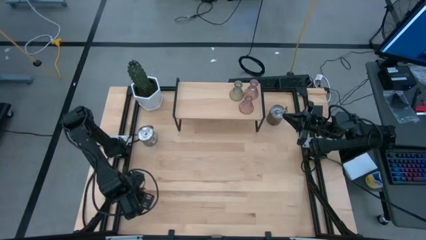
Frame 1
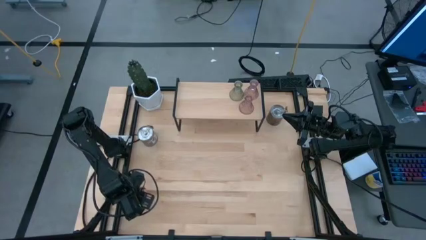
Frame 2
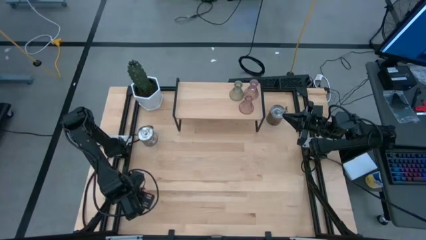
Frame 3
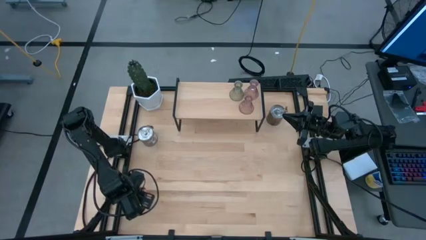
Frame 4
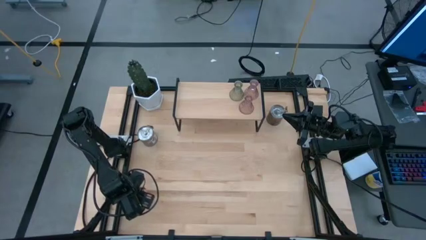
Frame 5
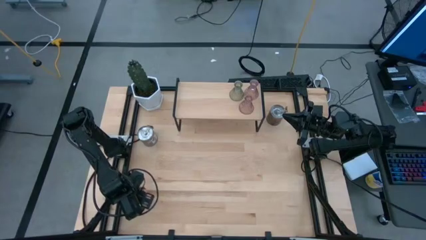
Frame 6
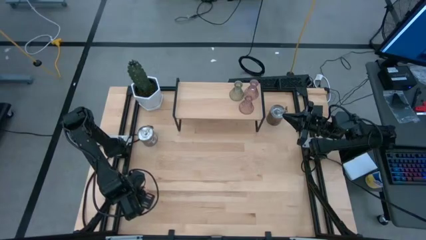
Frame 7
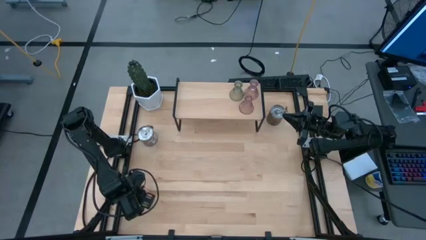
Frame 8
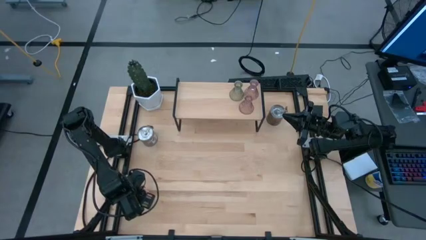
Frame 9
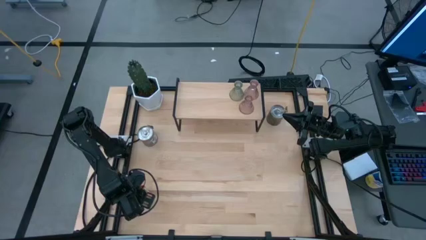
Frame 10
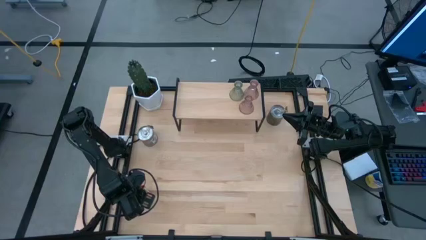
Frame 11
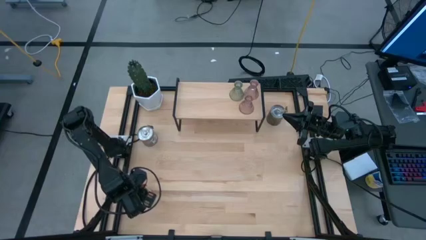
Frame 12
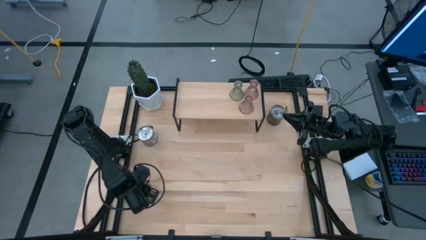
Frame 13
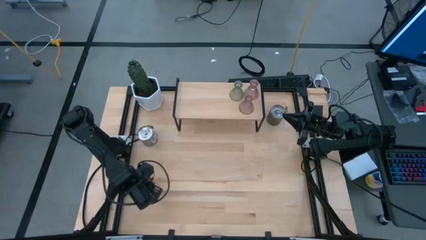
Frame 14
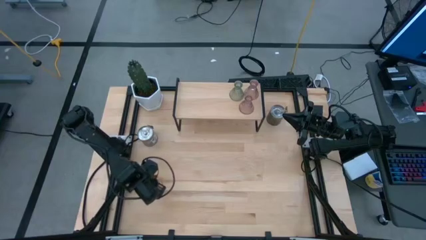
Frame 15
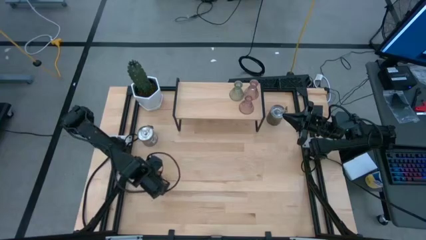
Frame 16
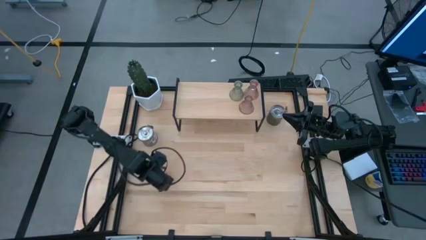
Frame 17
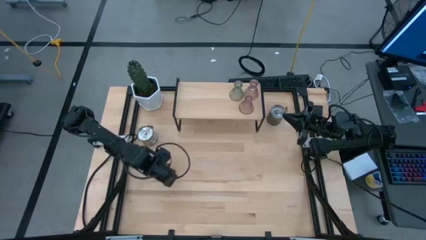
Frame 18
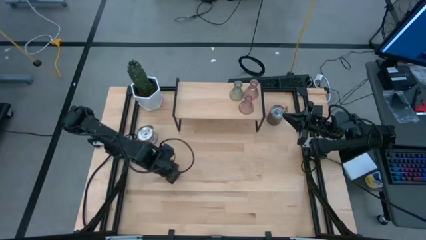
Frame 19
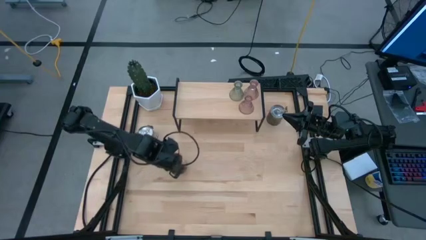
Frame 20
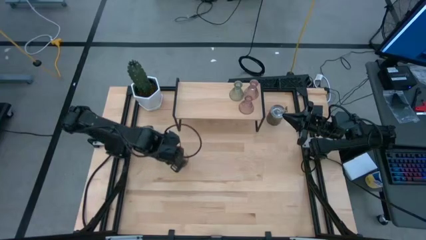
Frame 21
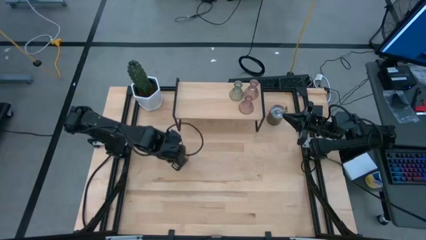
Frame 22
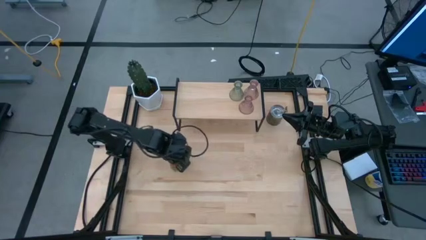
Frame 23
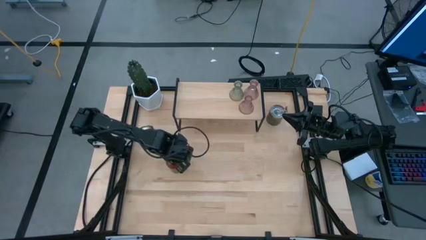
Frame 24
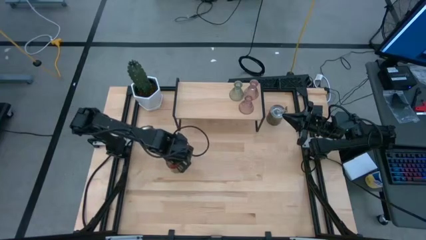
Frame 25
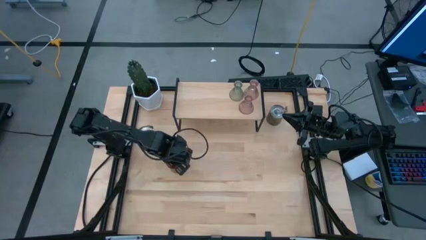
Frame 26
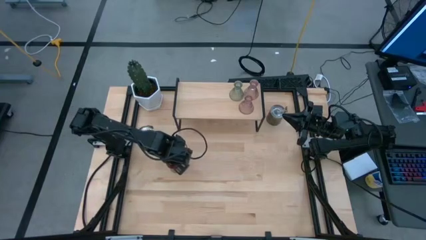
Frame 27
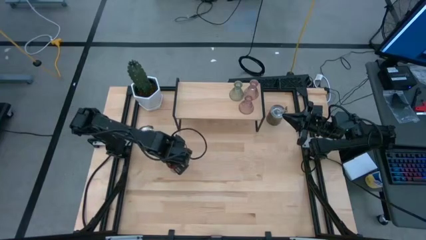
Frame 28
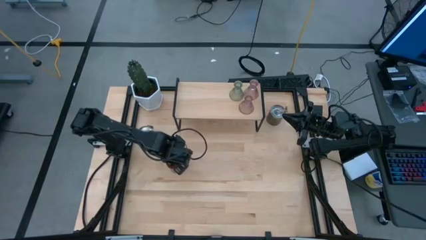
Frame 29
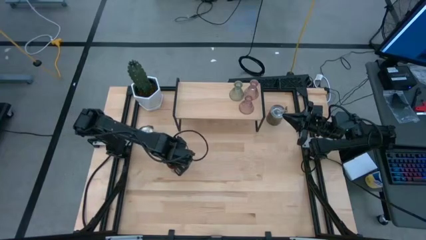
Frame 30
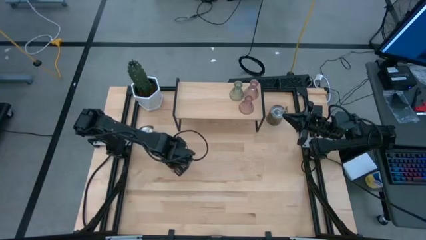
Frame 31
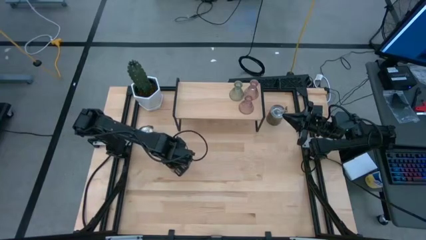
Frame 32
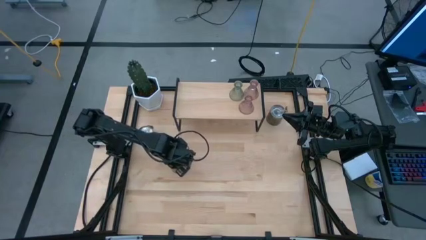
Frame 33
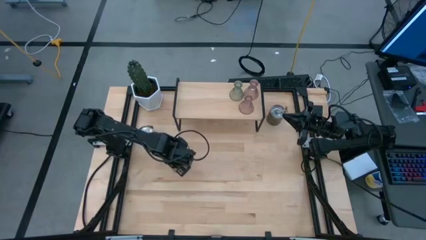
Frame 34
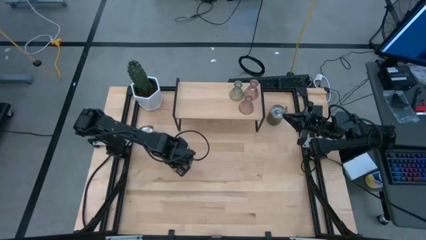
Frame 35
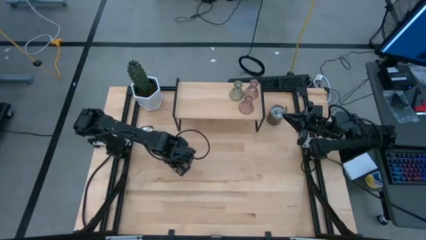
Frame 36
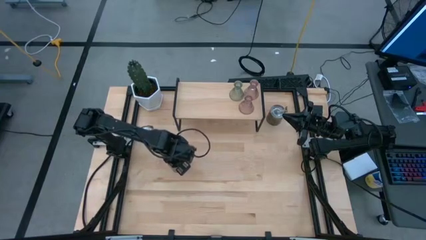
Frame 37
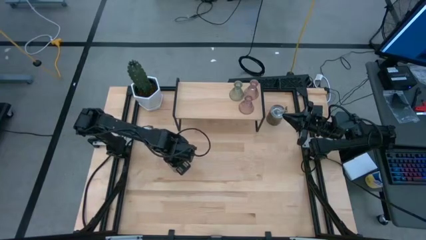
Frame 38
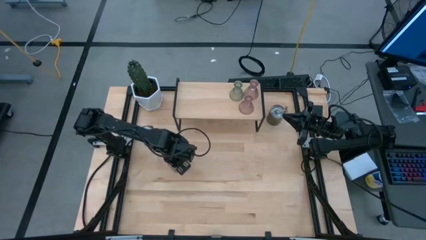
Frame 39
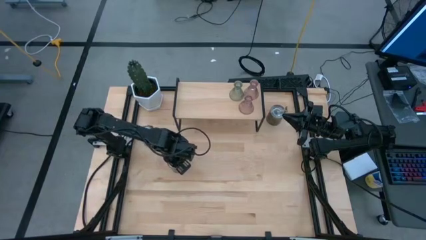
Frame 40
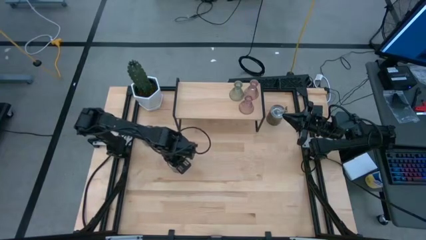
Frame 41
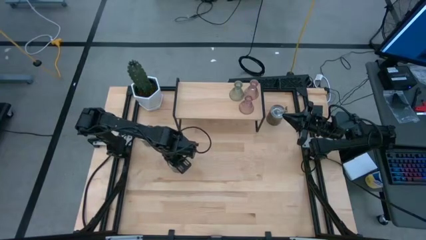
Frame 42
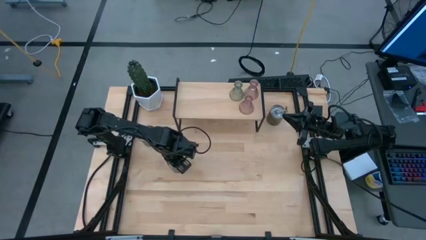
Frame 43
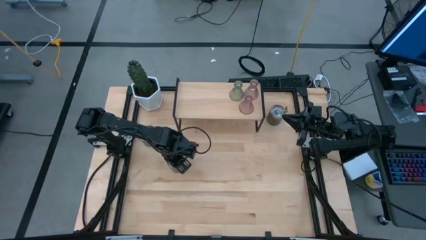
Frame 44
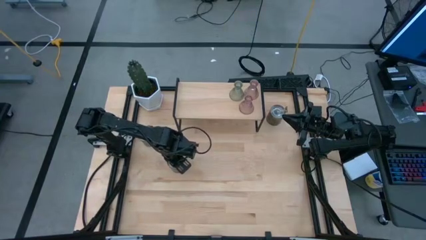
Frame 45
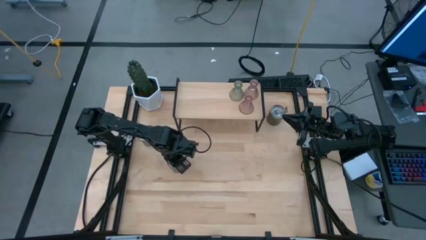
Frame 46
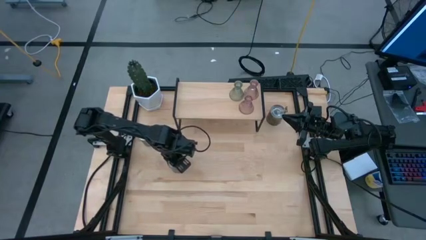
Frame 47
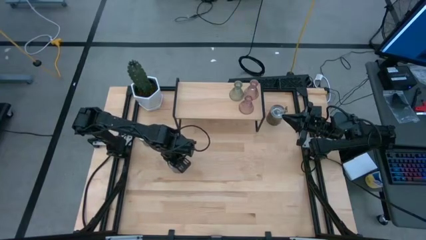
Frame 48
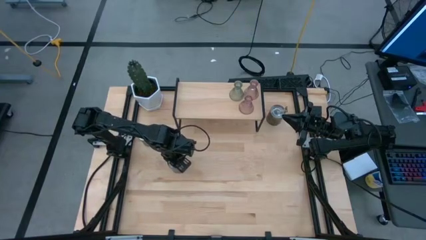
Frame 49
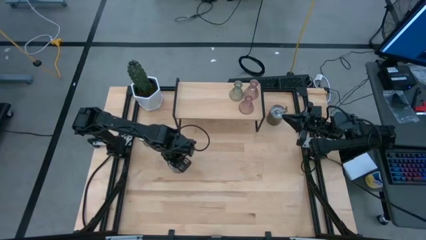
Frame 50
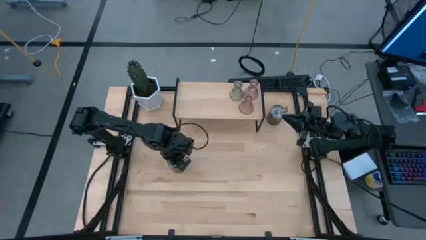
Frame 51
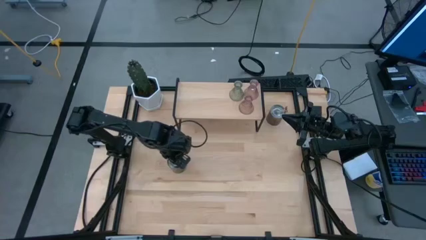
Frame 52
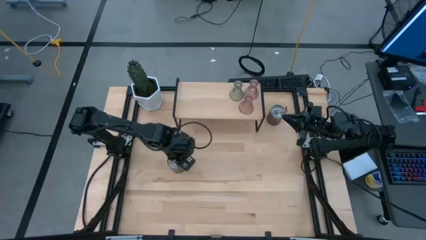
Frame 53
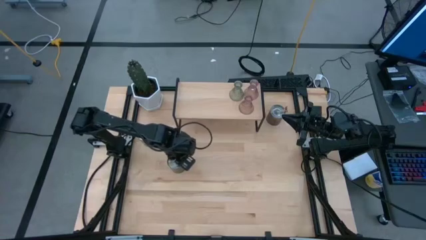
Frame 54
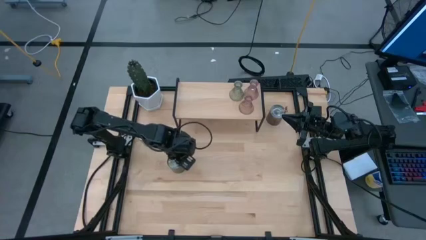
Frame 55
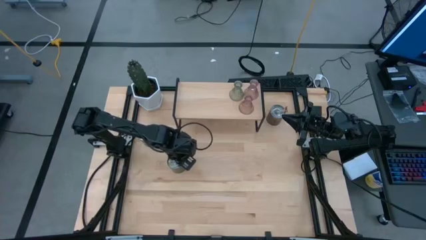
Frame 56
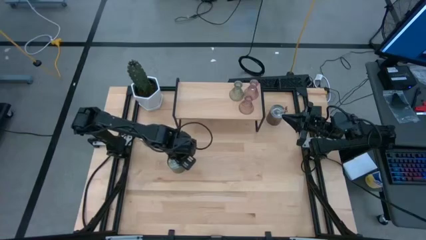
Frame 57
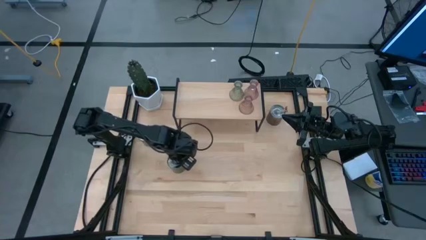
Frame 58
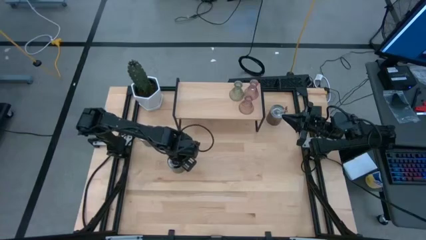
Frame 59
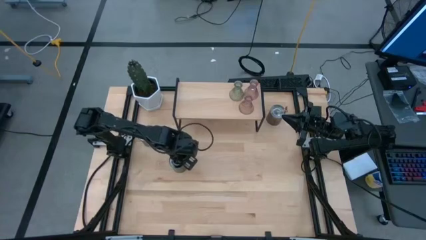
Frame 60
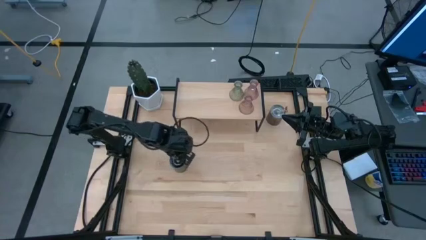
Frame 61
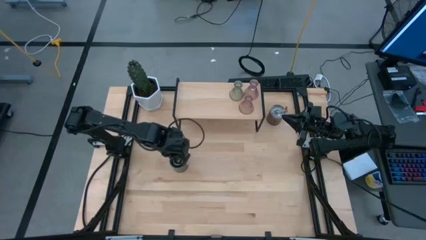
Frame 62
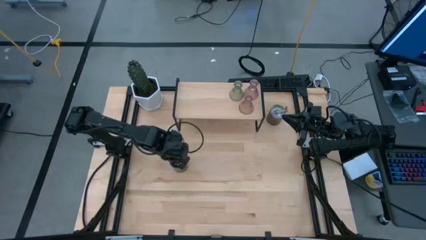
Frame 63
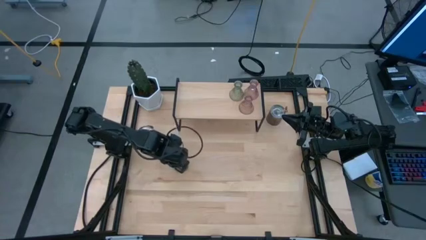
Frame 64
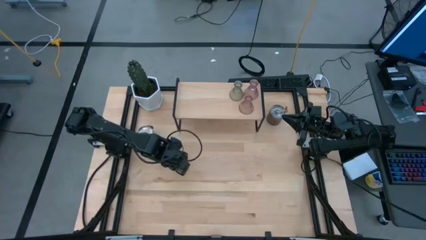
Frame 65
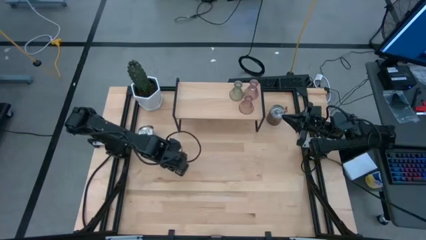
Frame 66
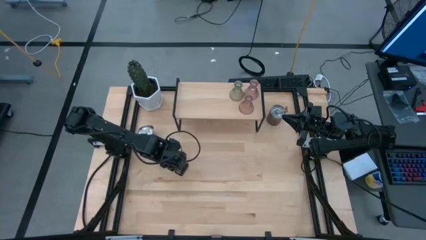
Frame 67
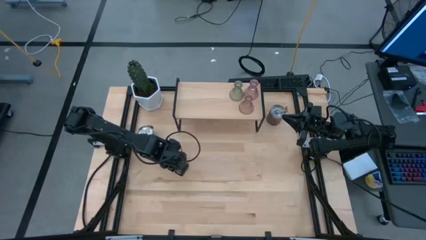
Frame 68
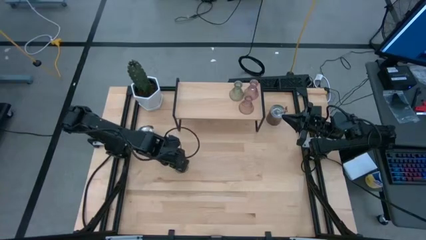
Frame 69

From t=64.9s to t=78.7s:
Task: Pick & Place candle stick holders
Put the orange scented candle on the shelf
